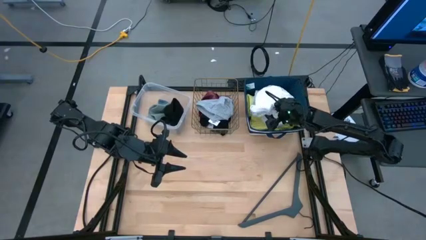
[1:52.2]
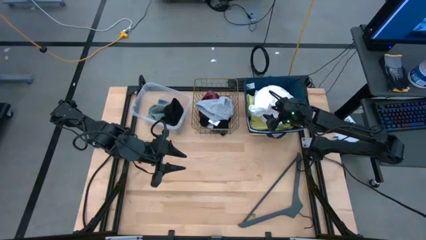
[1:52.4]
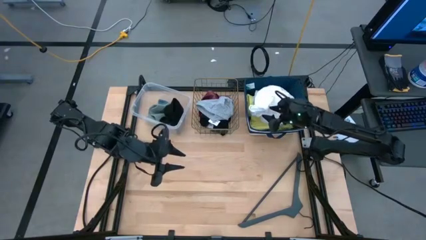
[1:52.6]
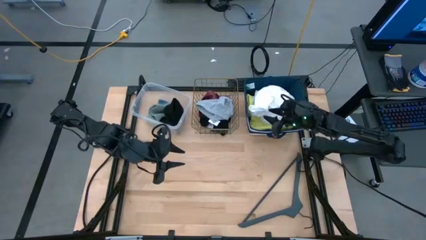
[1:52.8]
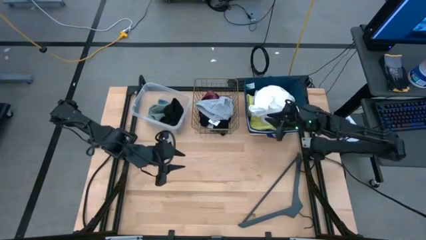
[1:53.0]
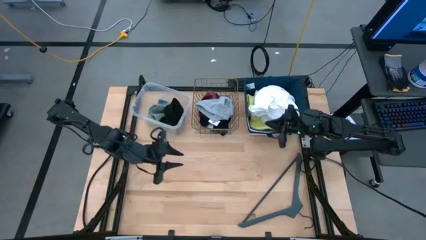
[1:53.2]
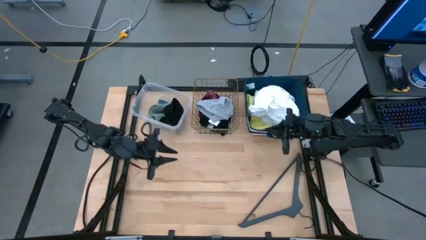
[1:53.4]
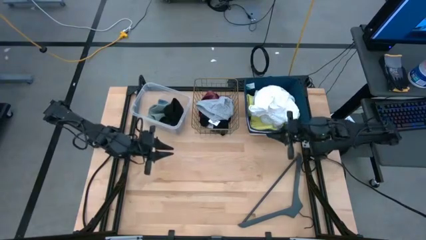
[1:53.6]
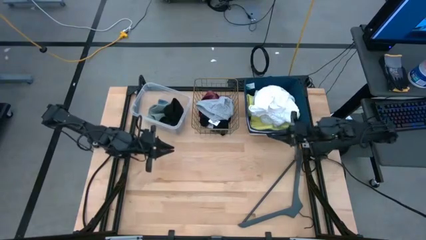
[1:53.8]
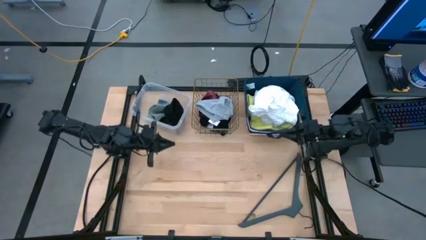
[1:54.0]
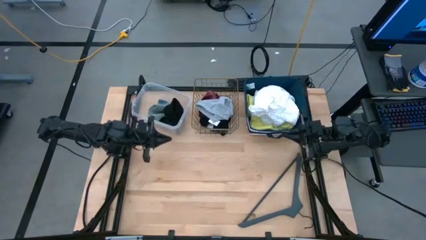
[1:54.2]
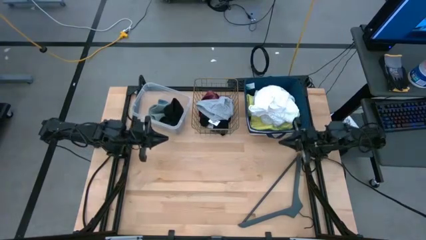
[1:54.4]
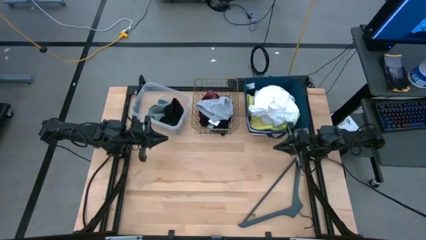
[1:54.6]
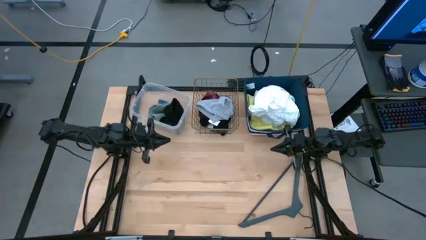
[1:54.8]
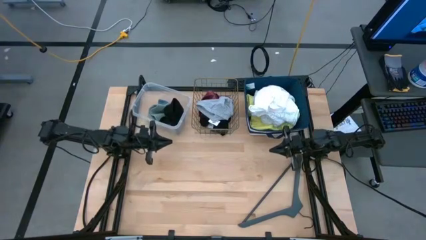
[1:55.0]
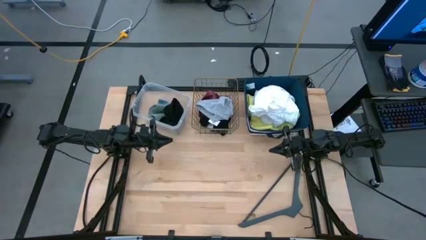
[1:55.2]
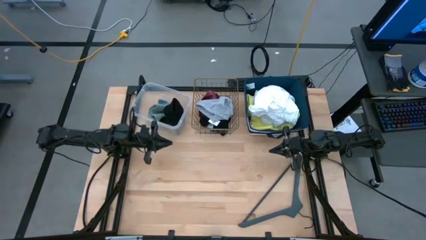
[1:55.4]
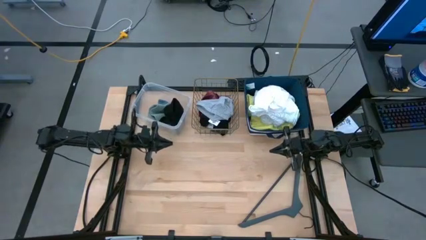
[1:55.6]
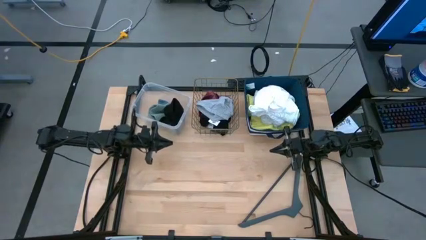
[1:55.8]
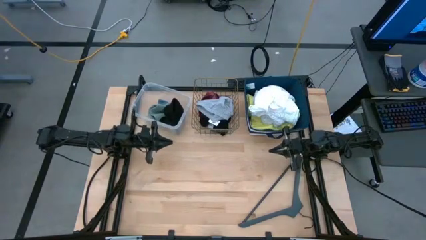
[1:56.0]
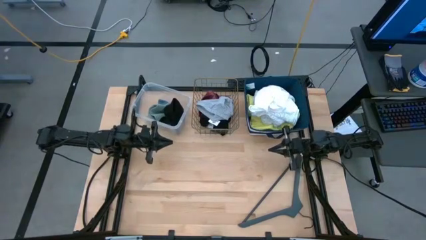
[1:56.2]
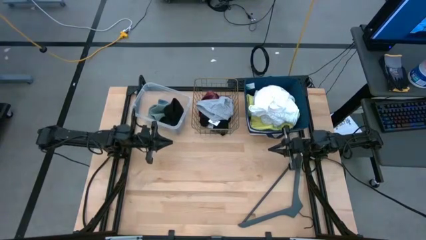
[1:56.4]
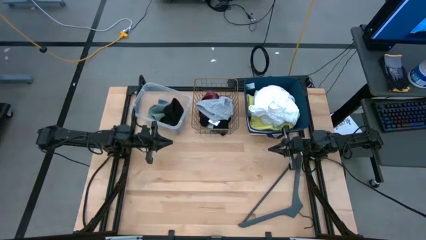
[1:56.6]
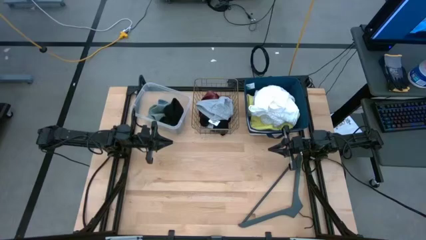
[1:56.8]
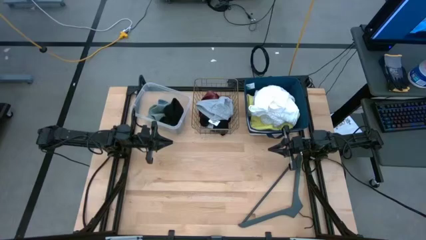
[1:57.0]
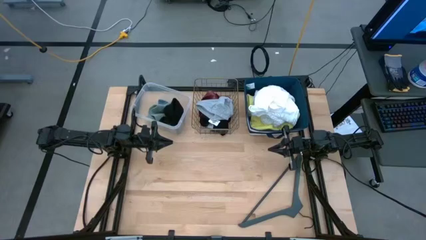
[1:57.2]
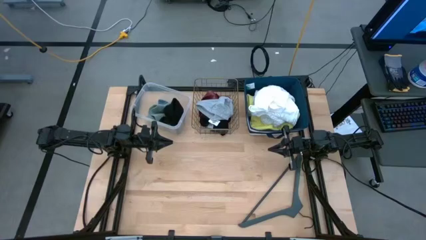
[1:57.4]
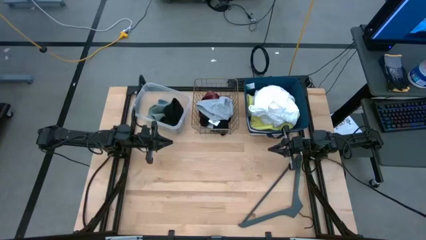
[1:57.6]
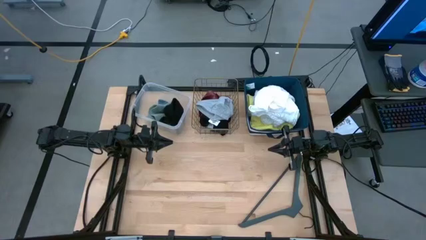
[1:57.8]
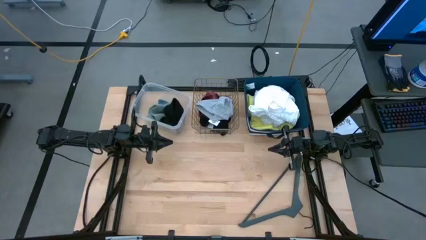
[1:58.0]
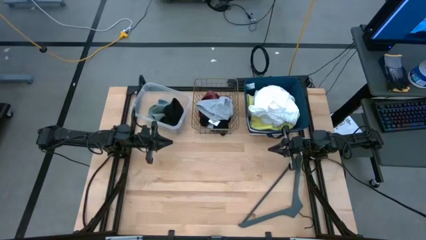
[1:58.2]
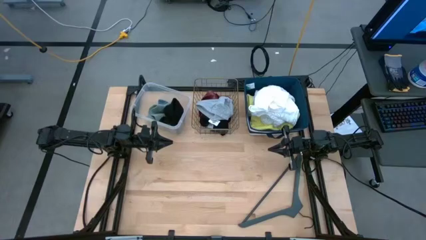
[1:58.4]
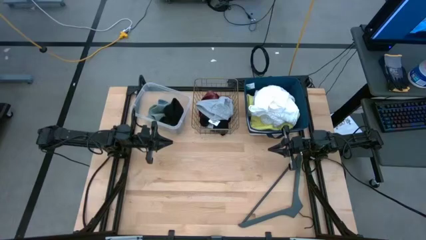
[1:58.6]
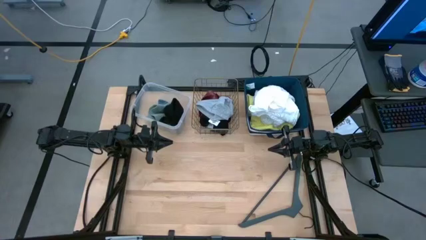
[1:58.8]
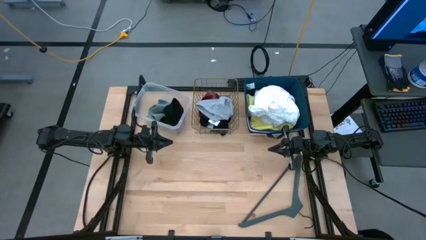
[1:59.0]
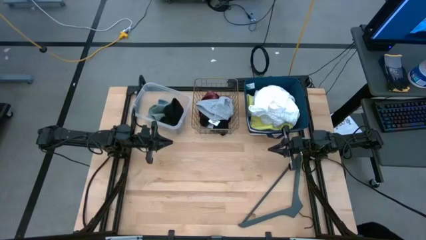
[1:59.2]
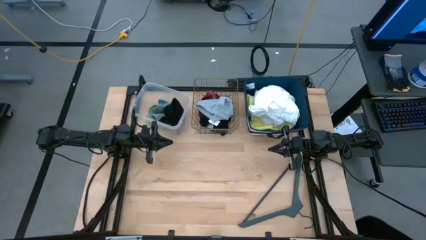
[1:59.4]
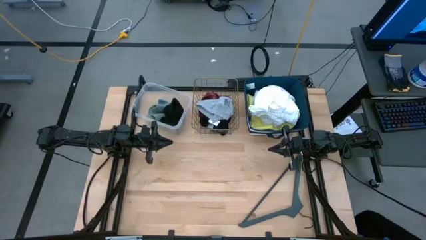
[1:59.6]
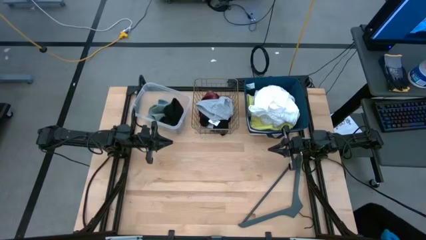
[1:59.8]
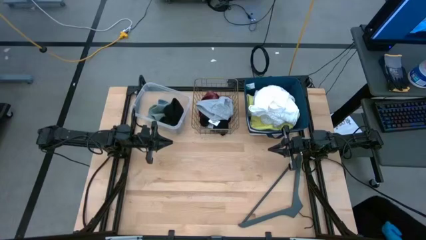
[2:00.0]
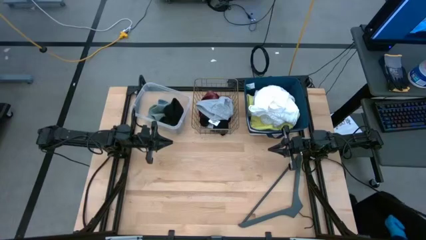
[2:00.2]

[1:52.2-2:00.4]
Task: Pick & Place Cloths
Return to Home Position

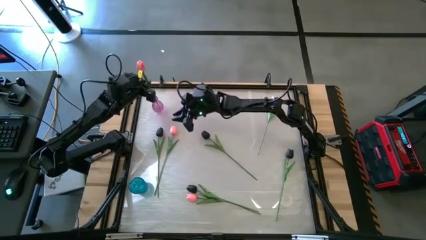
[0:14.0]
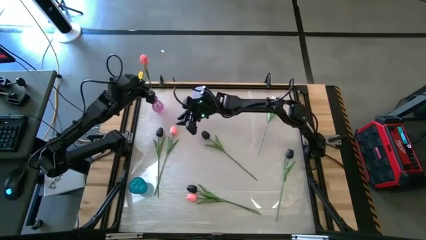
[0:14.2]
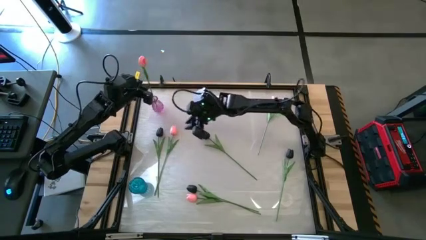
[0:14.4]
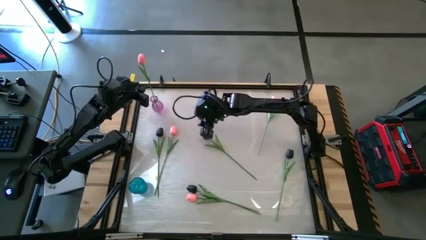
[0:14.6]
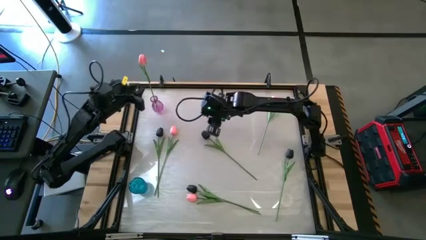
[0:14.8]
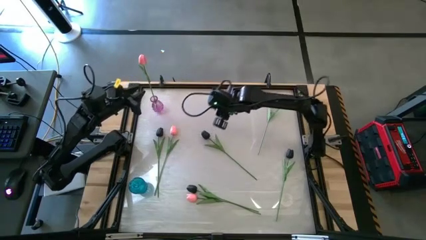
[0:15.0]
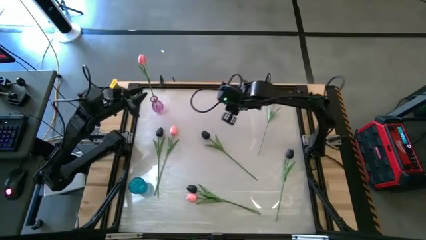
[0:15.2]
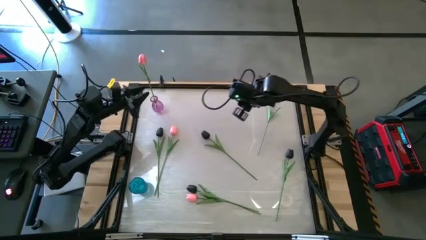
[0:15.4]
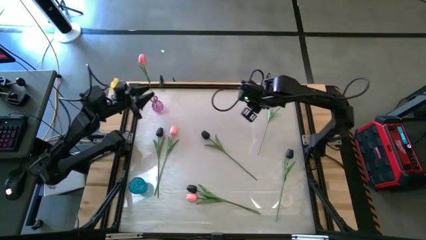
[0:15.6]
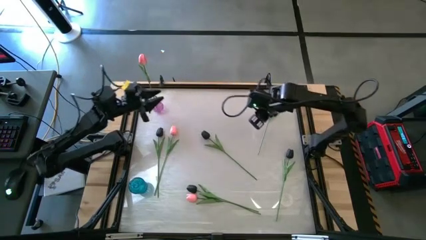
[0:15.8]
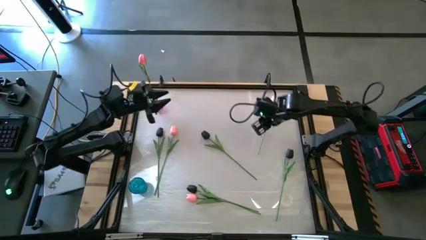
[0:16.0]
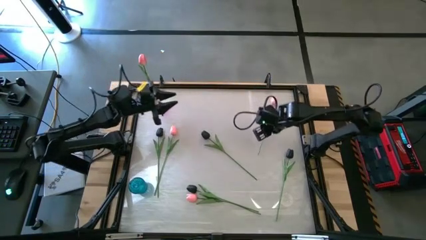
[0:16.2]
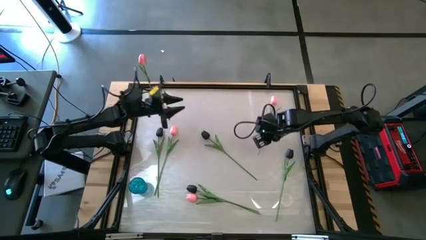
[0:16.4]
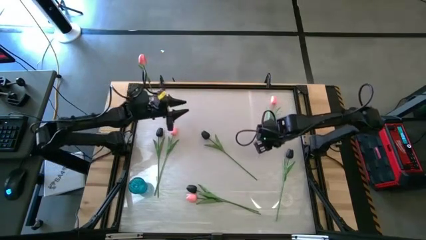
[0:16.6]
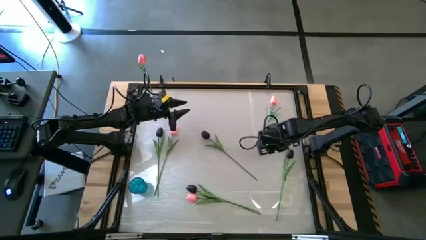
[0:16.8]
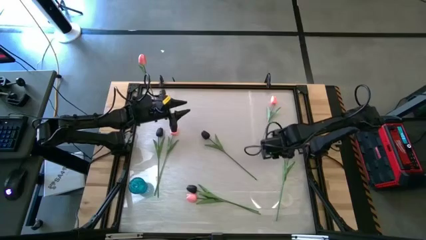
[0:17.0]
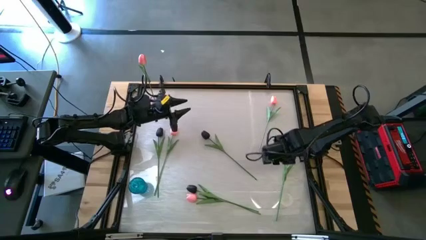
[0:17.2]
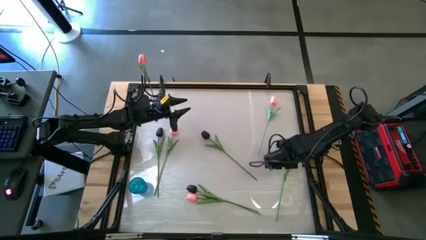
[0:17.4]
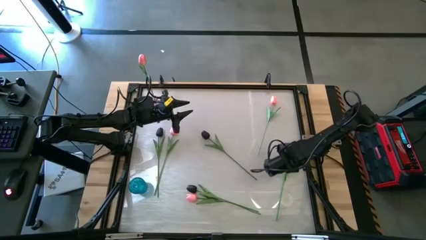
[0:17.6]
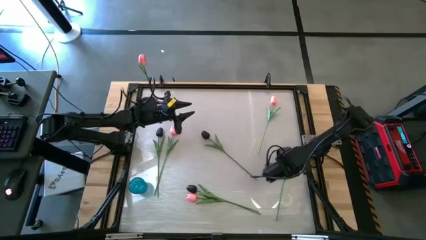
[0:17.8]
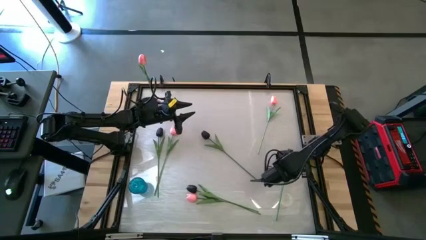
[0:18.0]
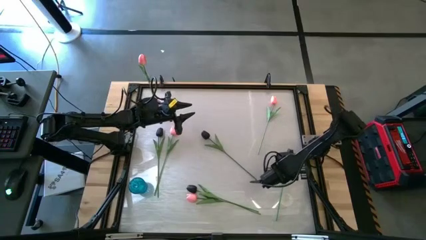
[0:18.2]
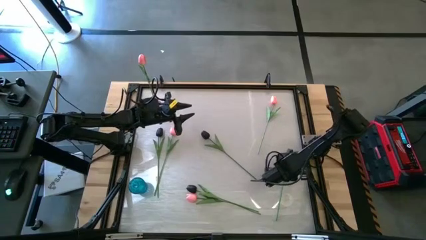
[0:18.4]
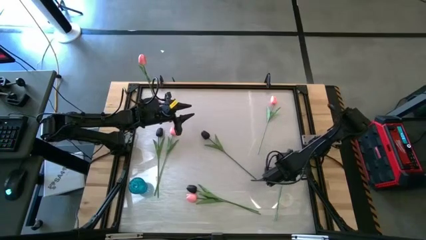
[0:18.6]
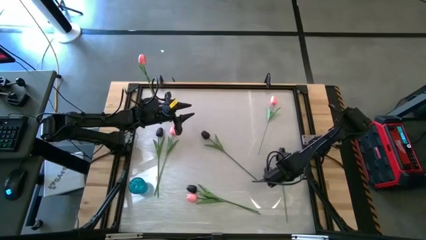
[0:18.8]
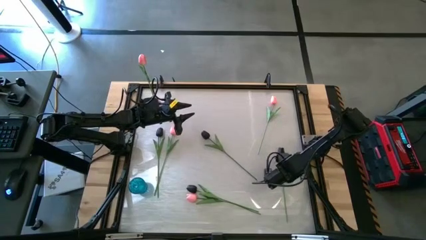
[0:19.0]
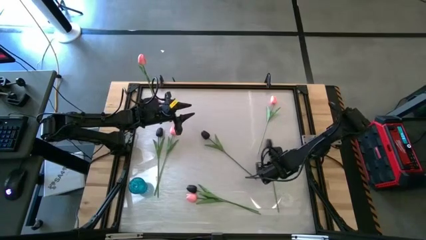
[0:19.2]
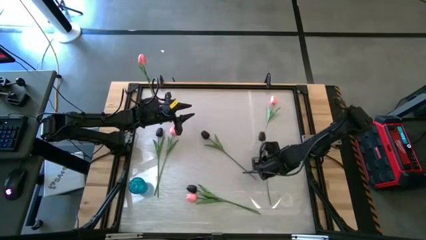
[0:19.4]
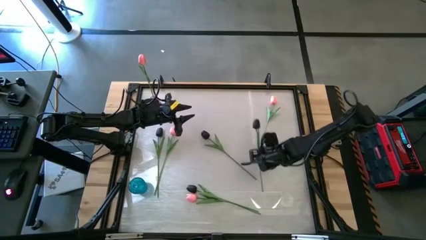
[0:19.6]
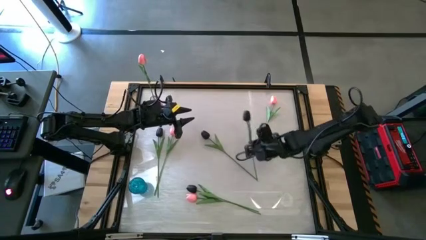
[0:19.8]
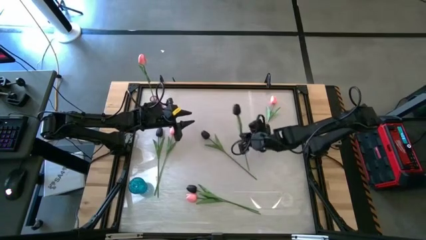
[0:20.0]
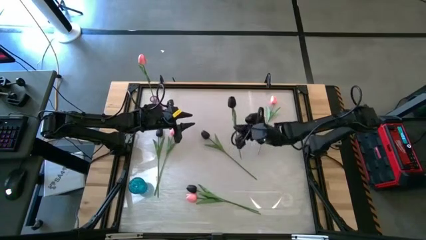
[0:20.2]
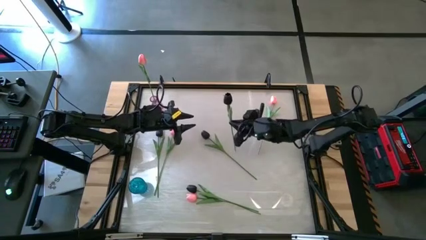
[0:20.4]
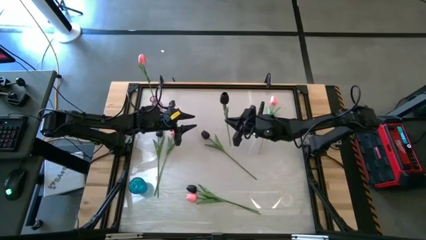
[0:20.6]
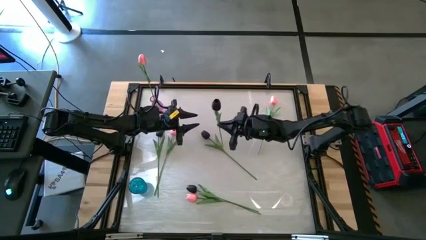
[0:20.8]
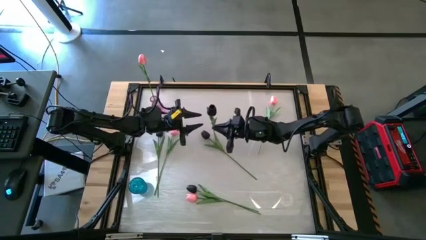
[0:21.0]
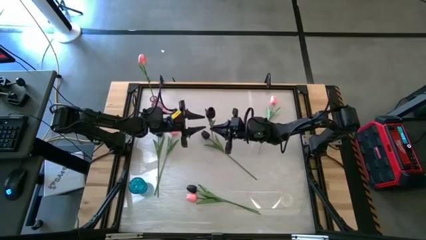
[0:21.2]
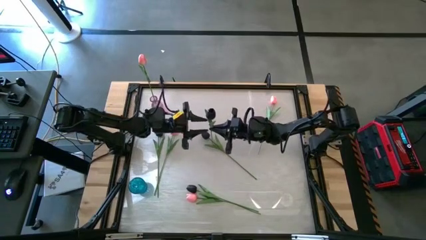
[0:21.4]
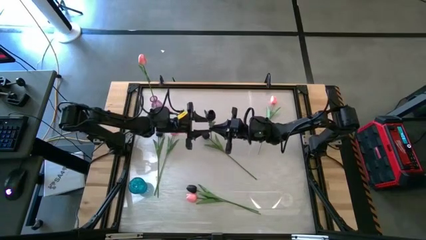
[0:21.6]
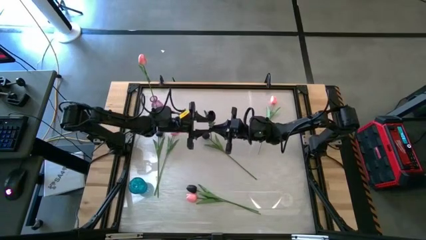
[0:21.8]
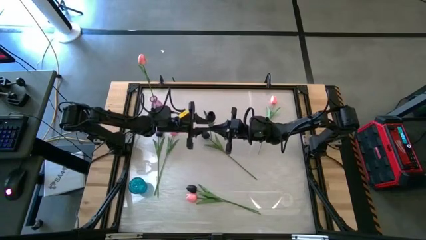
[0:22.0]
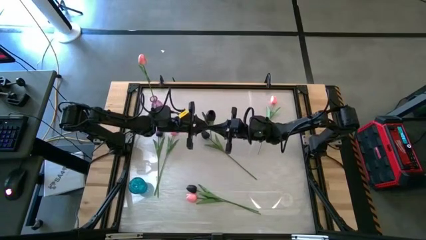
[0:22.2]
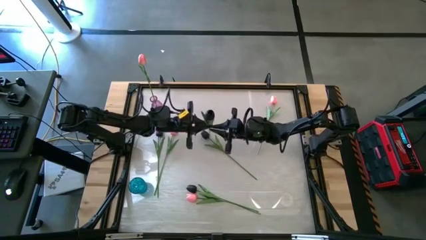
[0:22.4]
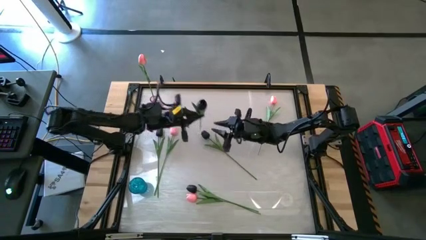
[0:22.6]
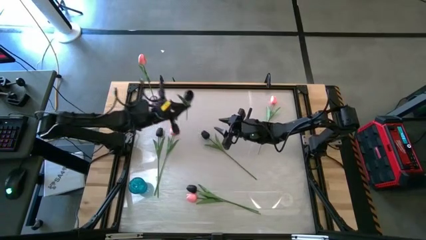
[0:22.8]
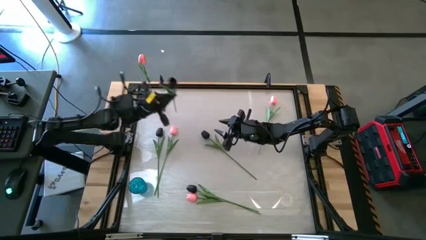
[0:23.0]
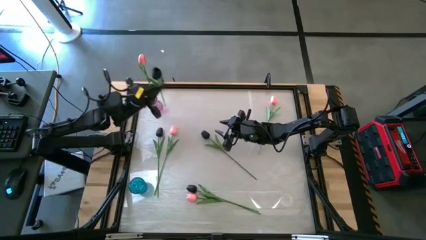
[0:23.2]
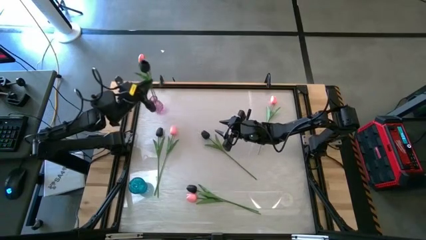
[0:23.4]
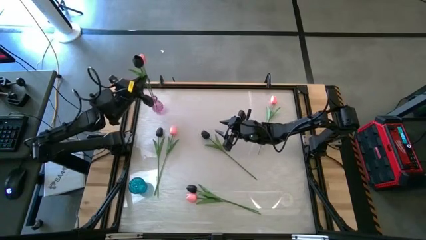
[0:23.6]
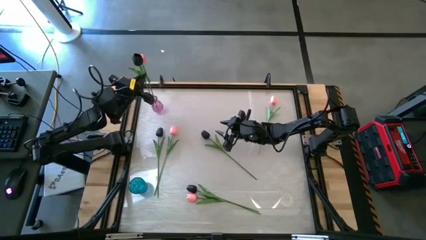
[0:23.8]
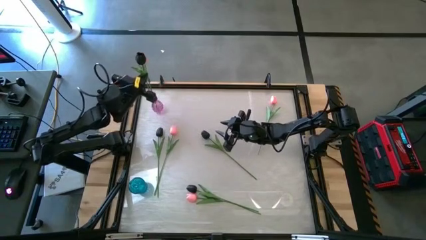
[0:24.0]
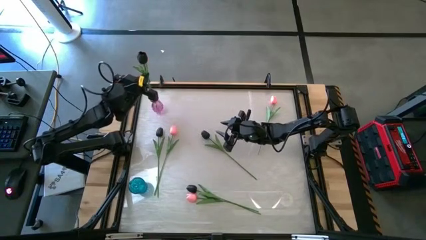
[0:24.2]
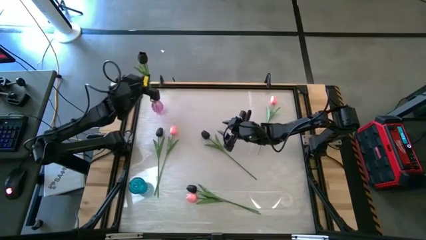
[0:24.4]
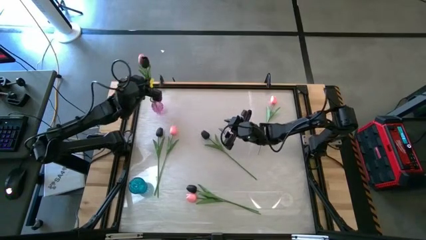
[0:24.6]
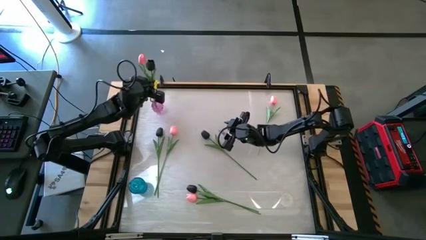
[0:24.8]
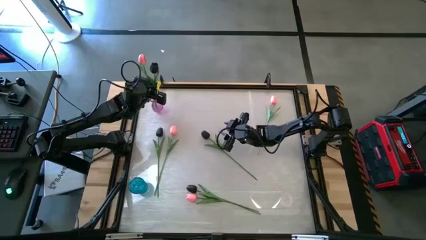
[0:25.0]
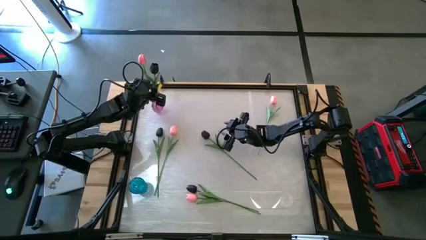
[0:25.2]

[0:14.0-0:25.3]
Task: Sort flowers into vase by color
Put the black flower into the purple glass vase
